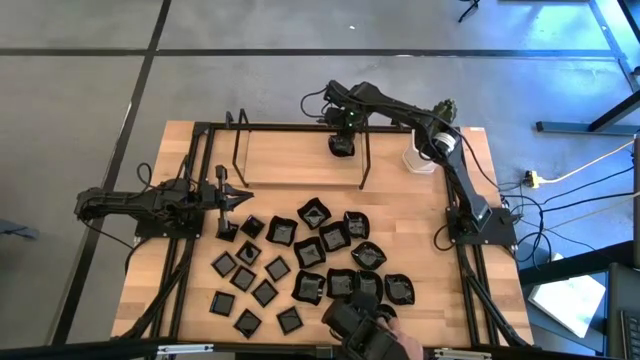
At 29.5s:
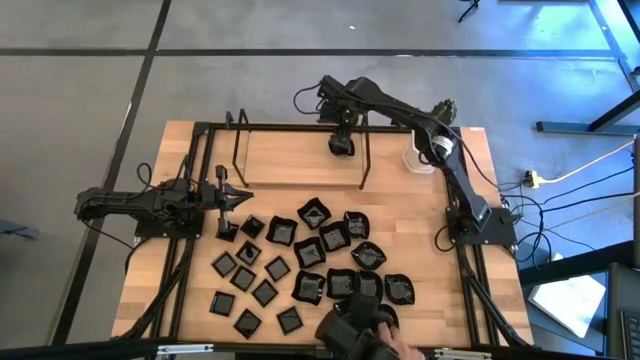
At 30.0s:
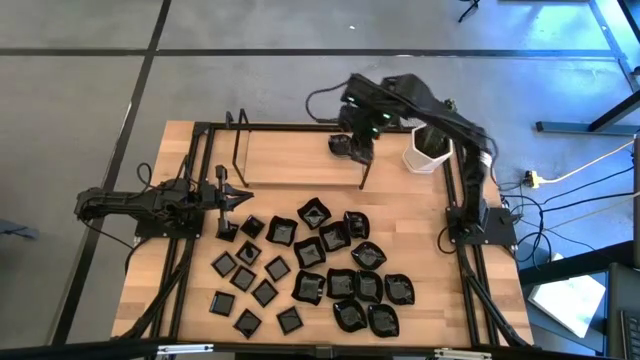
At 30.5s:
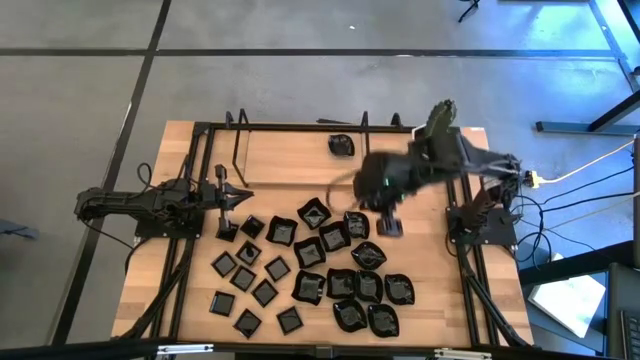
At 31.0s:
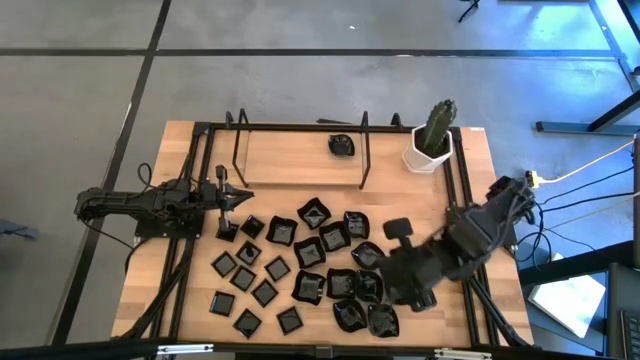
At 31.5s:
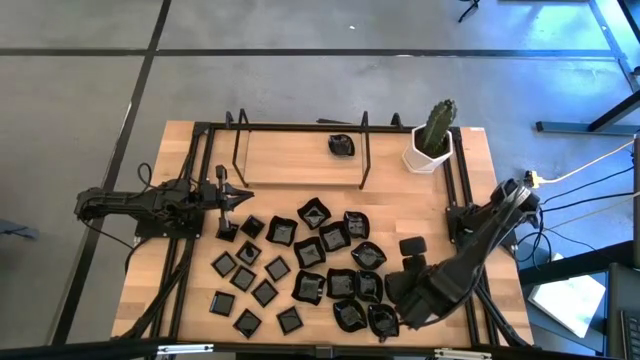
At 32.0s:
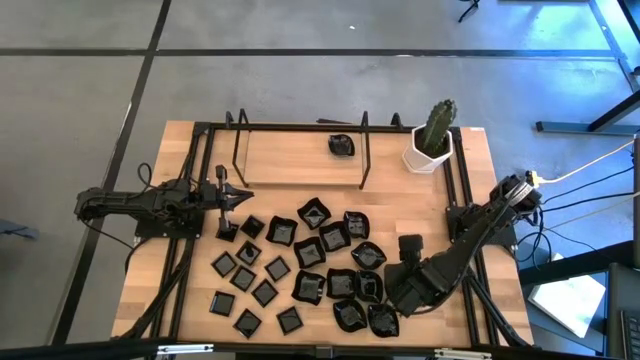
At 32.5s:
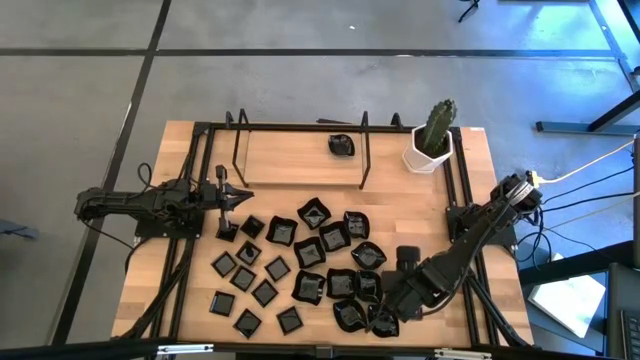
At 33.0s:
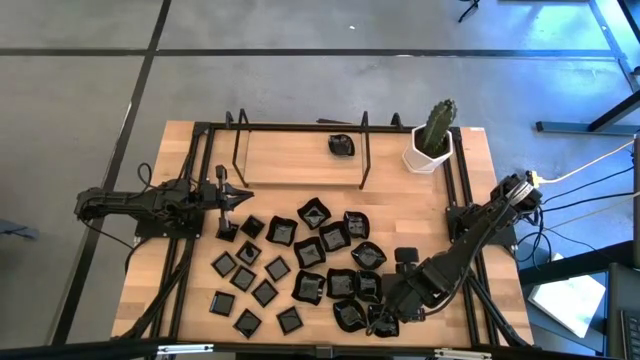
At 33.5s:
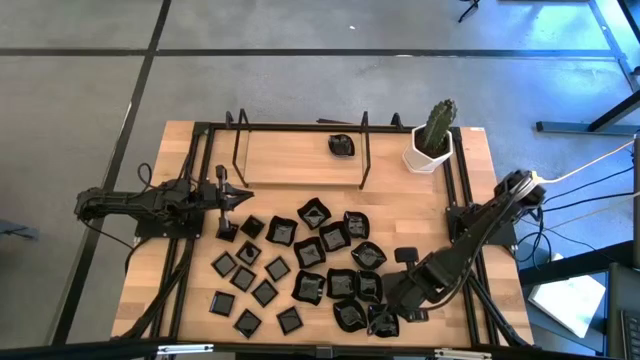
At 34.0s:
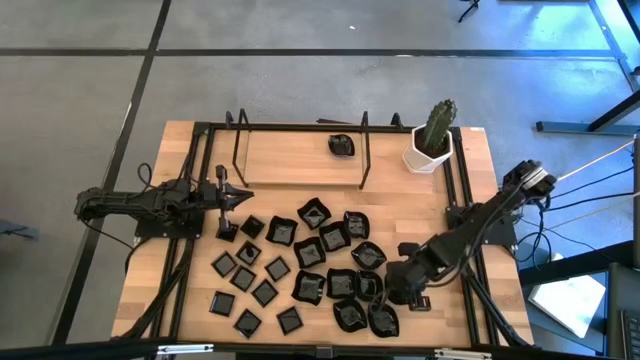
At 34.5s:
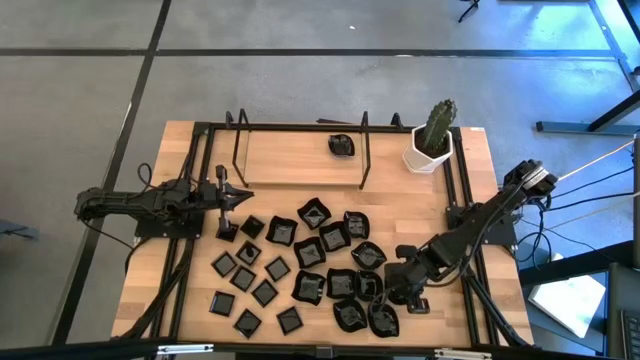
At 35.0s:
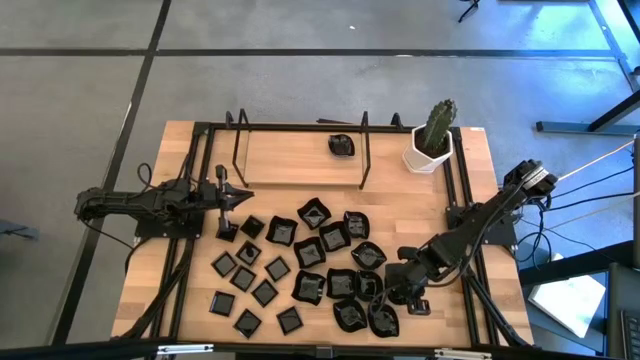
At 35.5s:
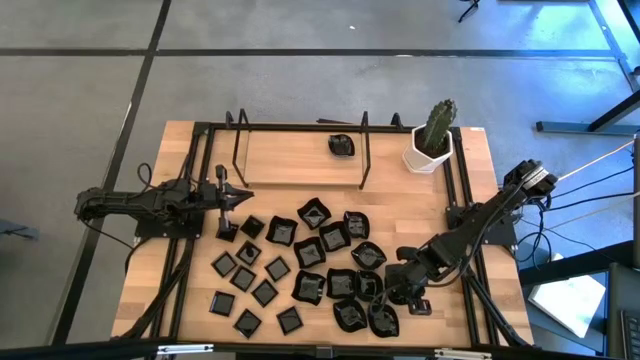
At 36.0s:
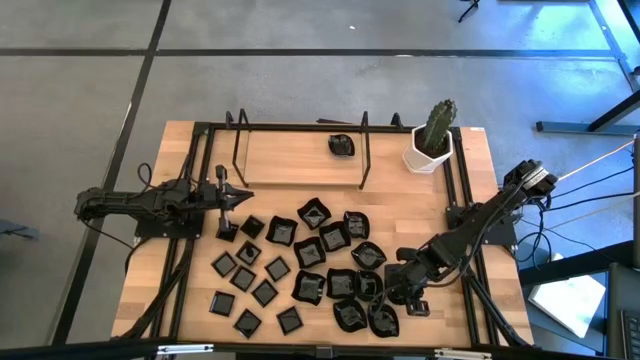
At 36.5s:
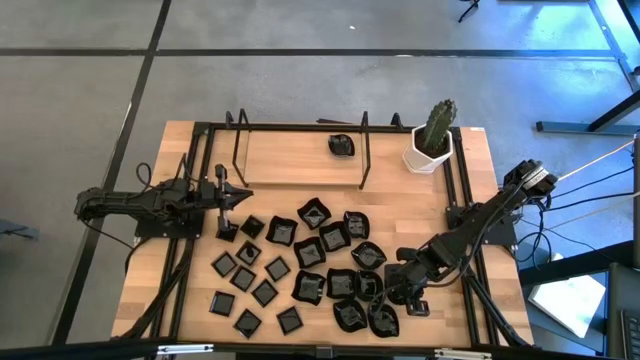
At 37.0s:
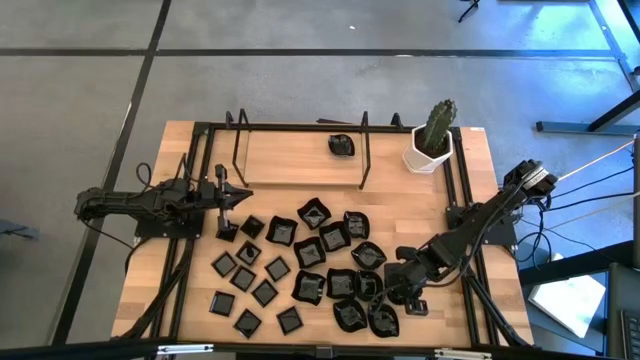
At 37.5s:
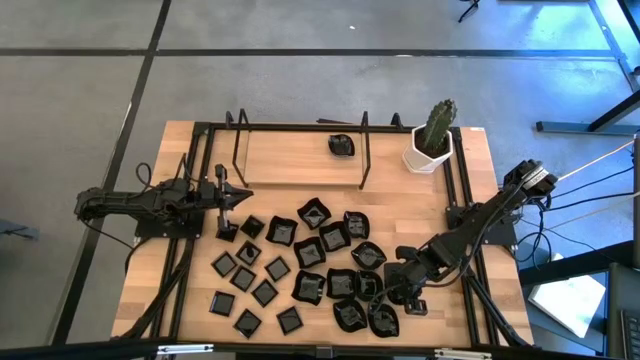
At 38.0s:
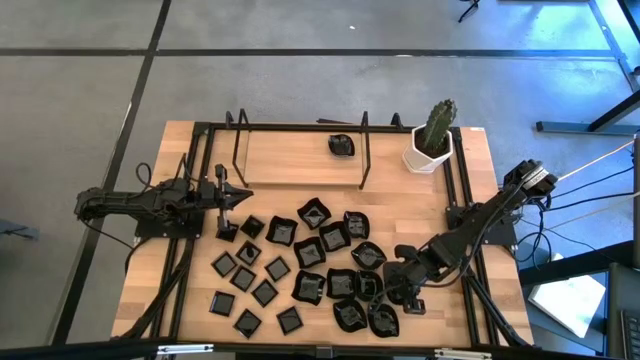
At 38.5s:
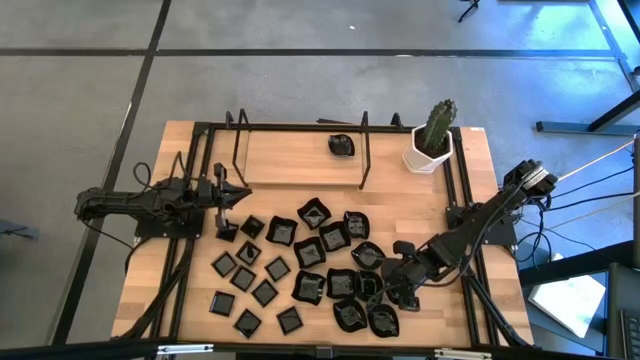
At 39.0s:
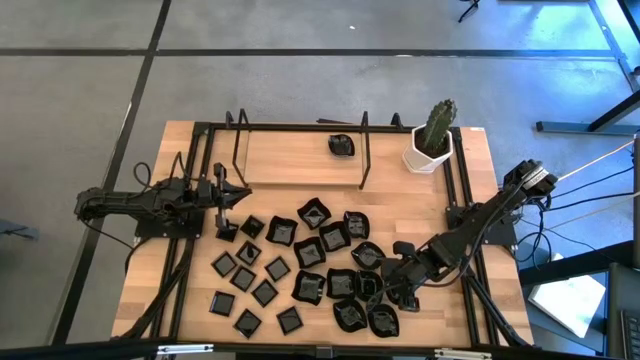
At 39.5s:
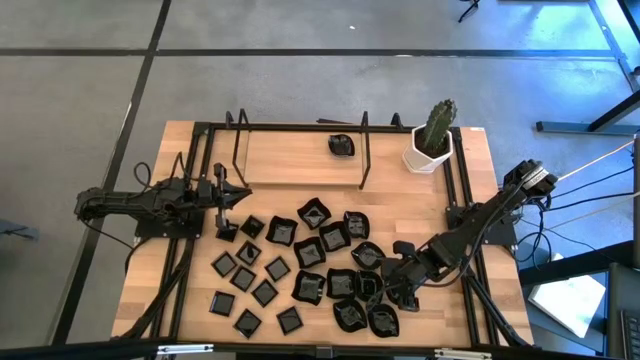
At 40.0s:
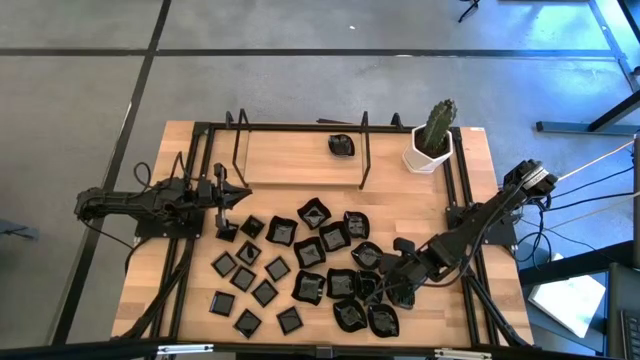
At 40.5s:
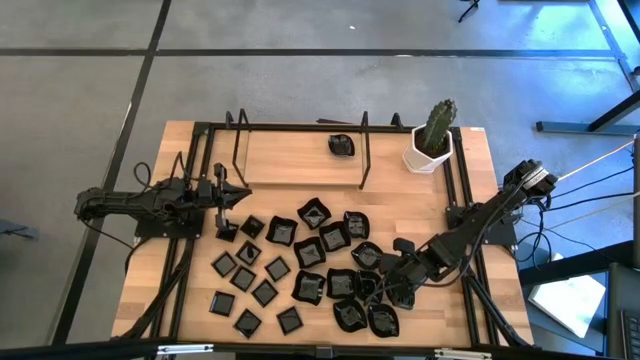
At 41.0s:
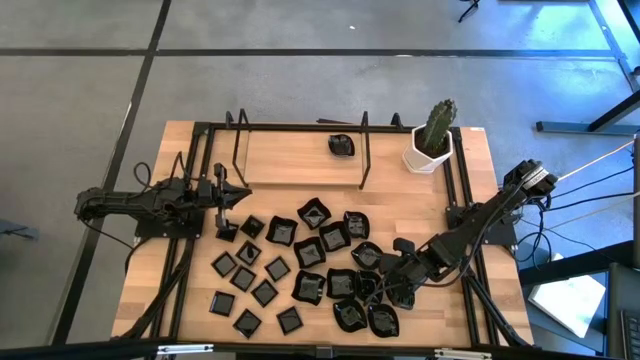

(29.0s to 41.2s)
Task: Pick & Place Mini shaped plates
Stack the leaf-shaped plate on top of the leaf-shaped plate on the shelf

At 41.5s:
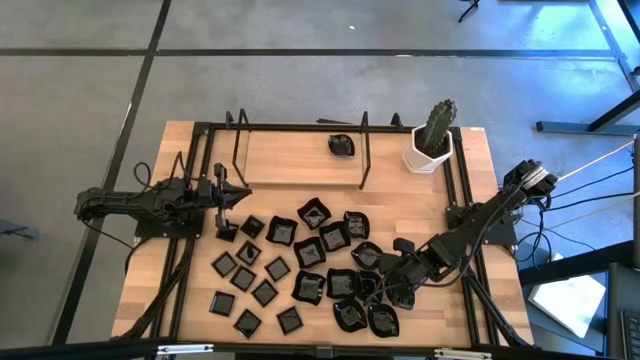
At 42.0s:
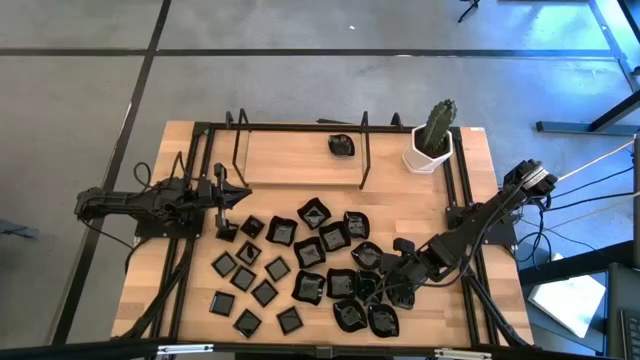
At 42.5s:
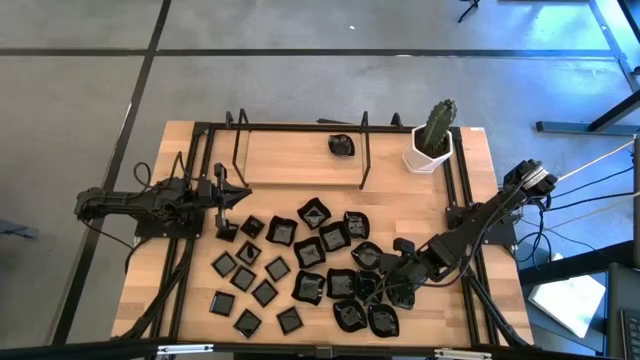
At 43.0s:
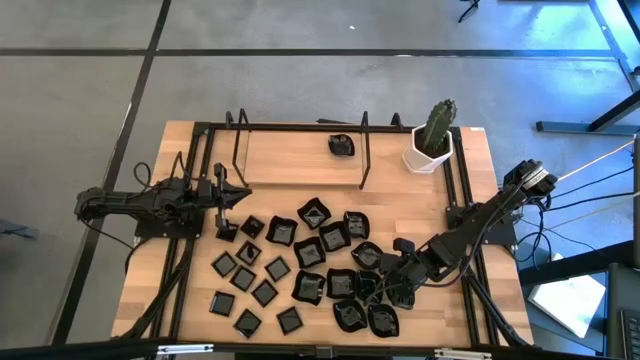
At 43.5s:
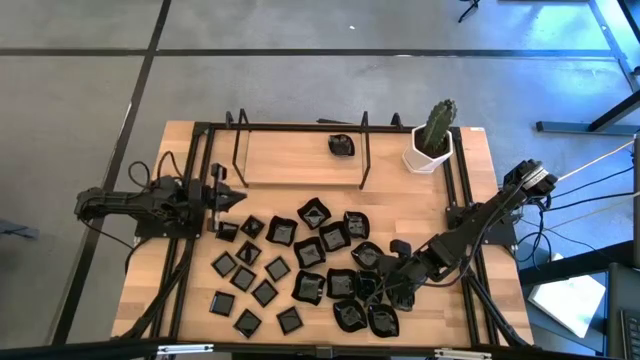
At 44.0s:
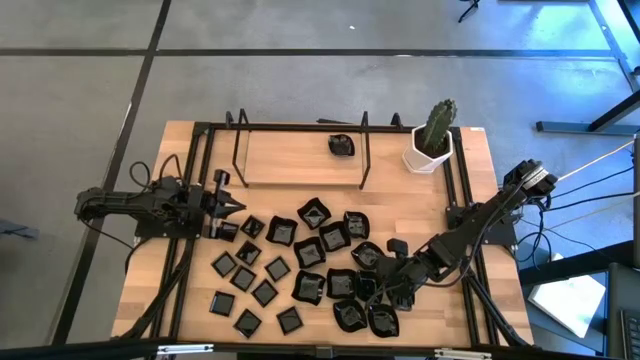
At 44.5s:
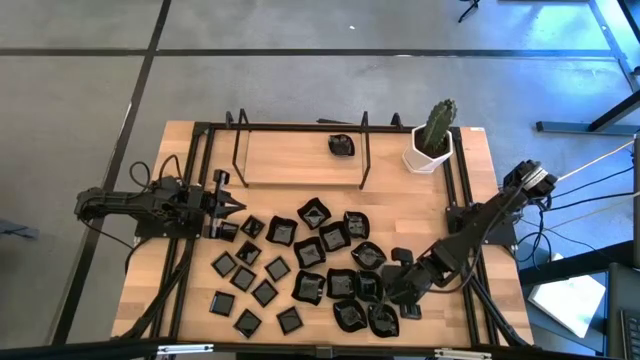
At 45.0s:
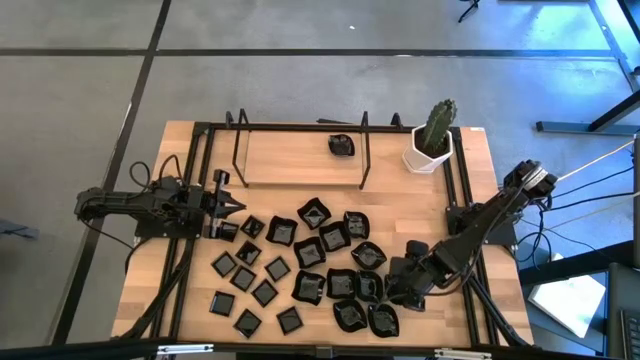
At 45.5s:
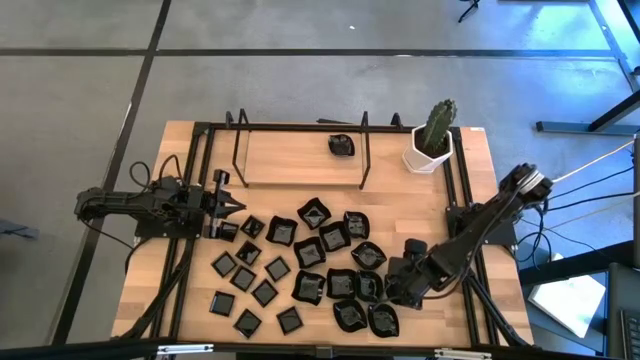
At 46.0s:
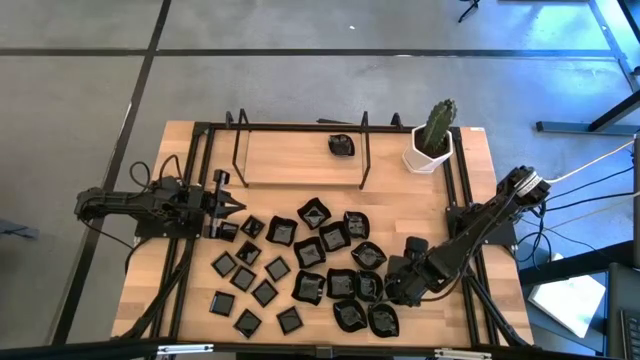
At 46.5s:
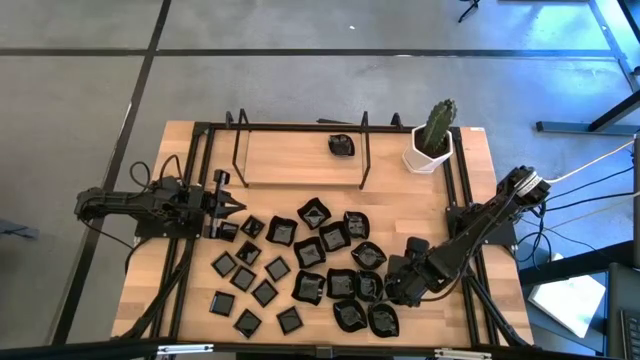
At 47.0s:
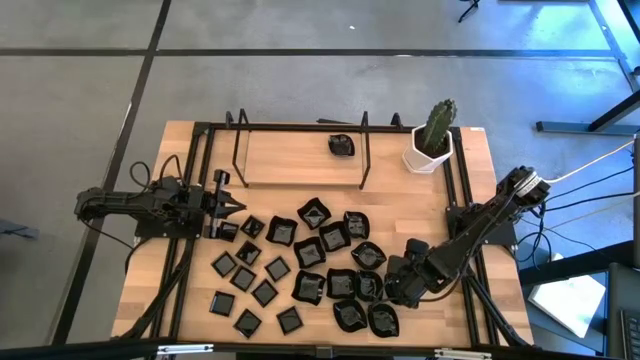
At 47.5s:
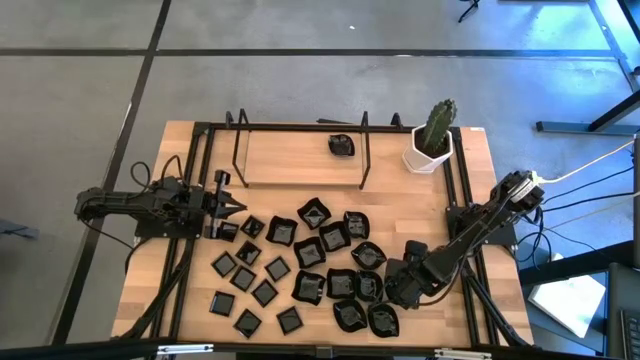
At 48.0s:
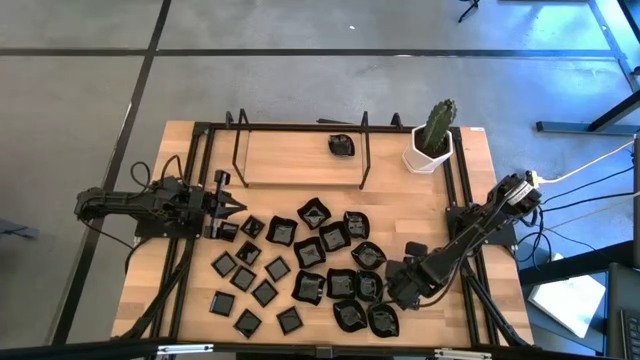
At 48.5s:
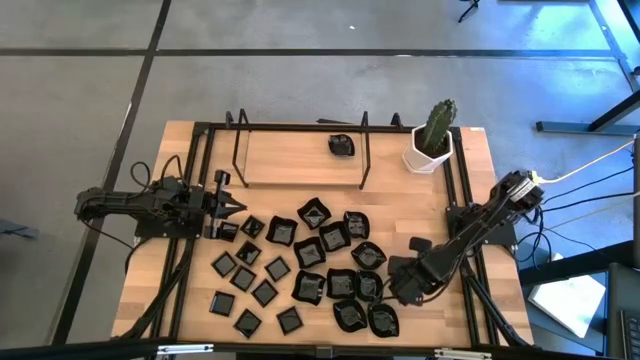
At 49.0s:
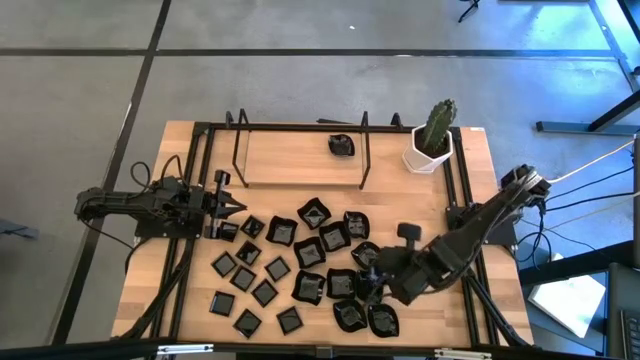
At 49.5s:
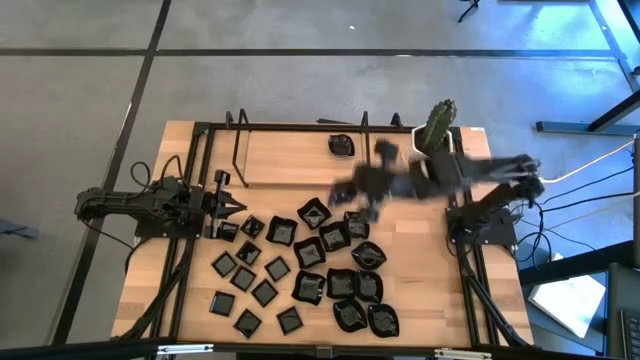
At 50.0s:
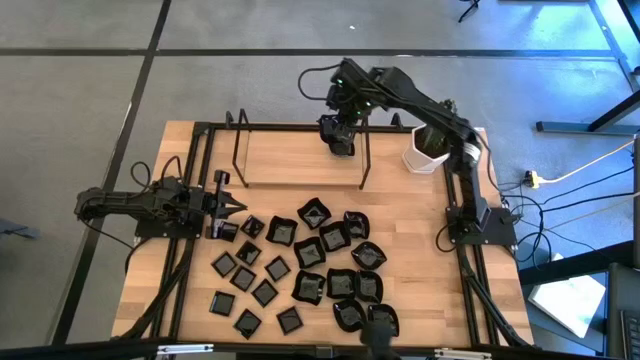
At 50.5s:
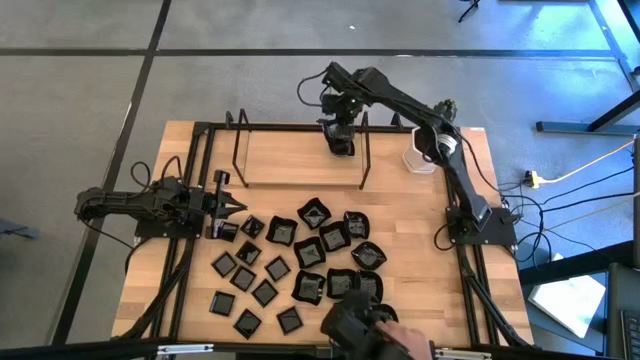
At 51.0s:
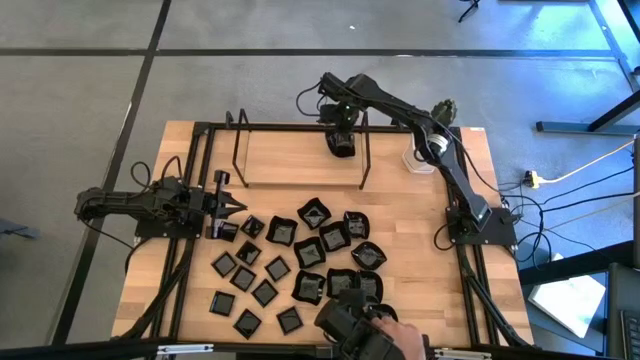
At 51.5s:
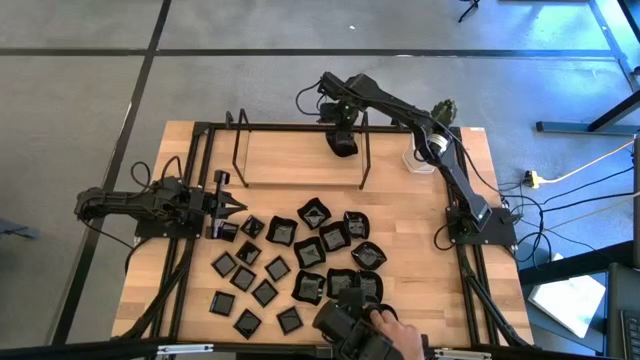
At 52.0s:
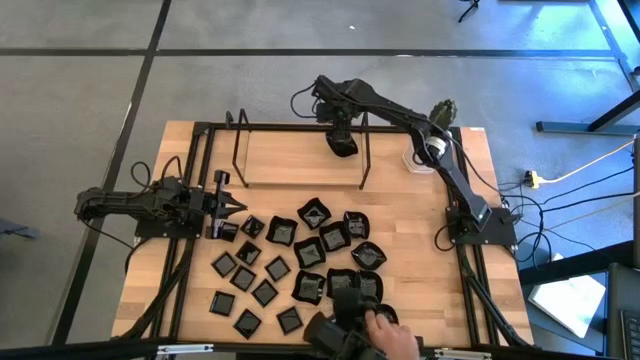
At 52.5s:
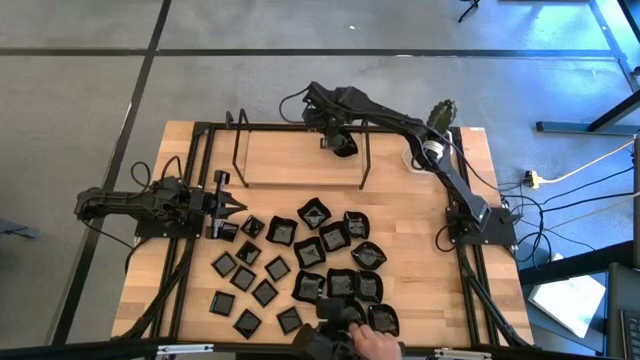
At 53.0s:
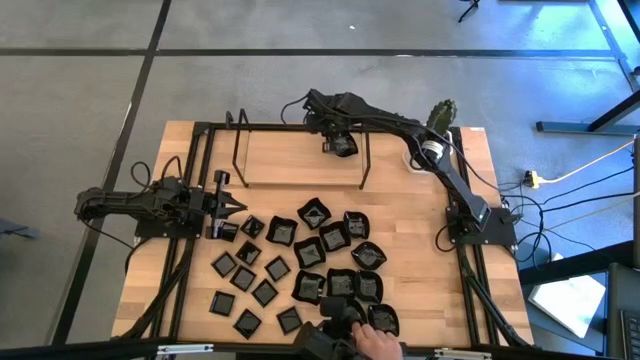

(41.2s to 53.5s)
Stack the leaf-shaped plate on top of the leaf-shaped plate on the shelf
